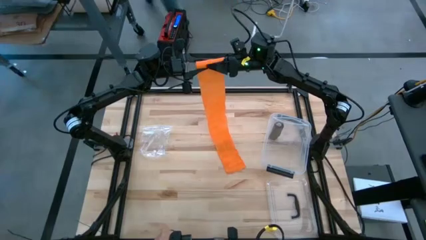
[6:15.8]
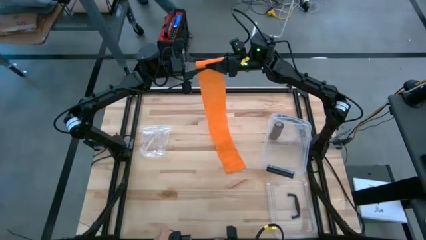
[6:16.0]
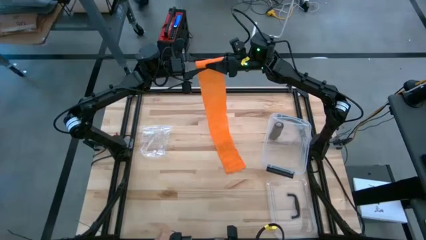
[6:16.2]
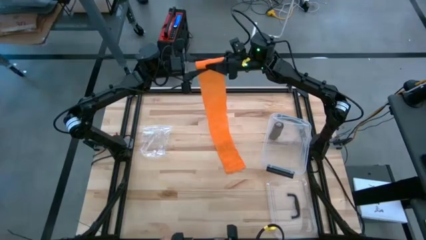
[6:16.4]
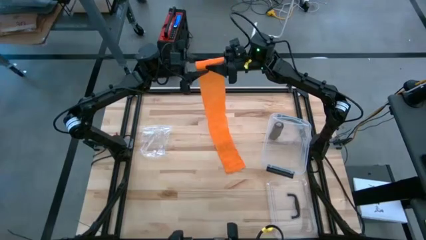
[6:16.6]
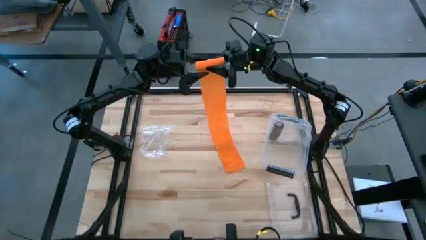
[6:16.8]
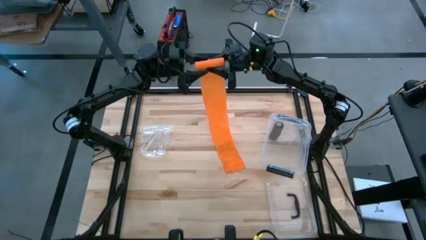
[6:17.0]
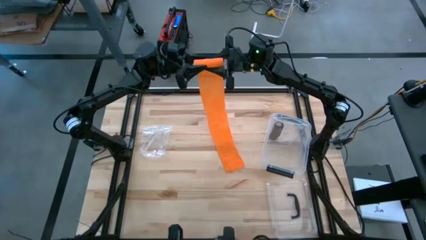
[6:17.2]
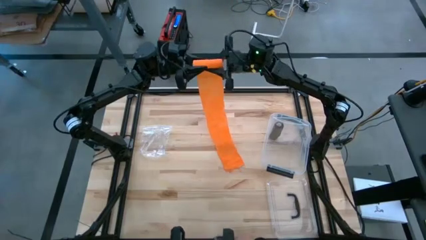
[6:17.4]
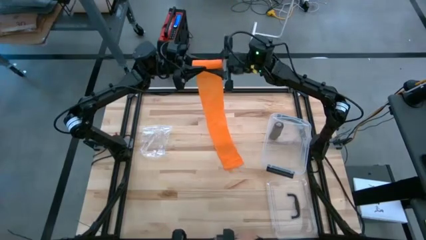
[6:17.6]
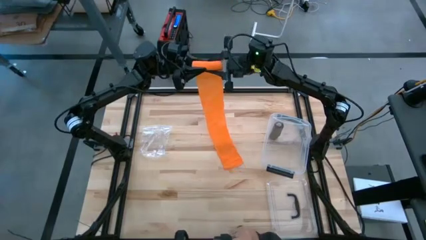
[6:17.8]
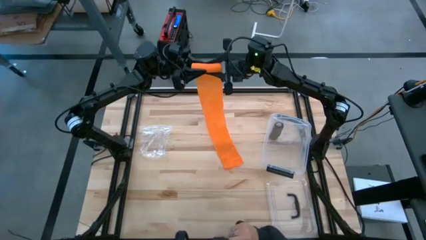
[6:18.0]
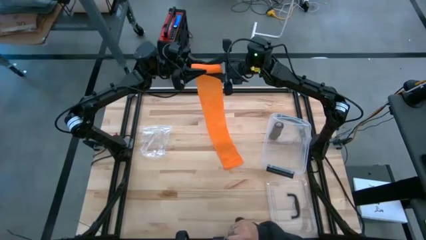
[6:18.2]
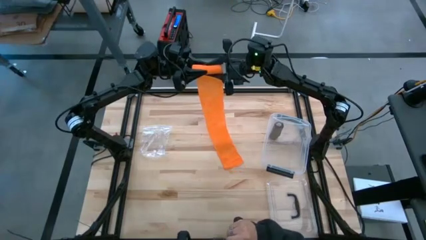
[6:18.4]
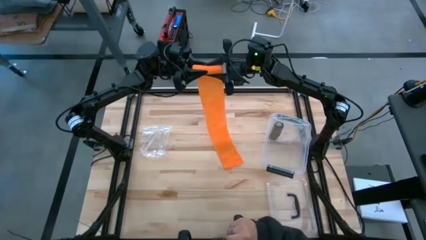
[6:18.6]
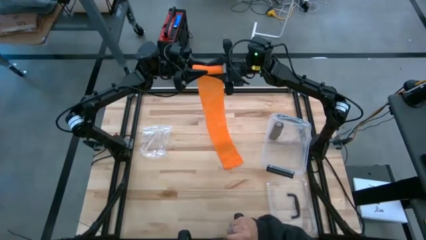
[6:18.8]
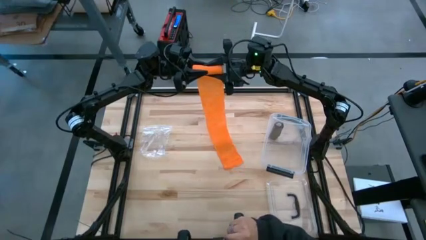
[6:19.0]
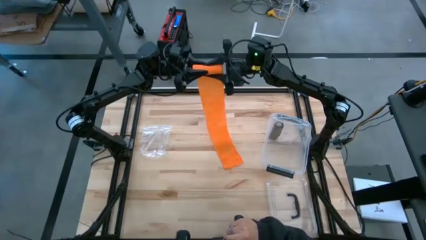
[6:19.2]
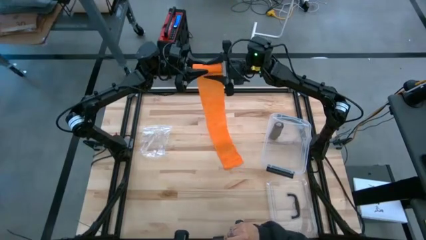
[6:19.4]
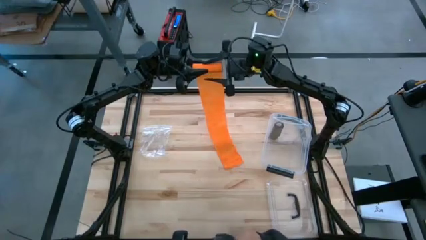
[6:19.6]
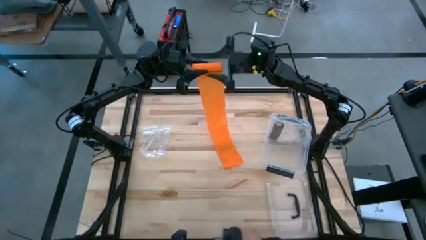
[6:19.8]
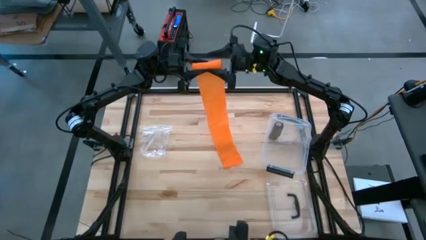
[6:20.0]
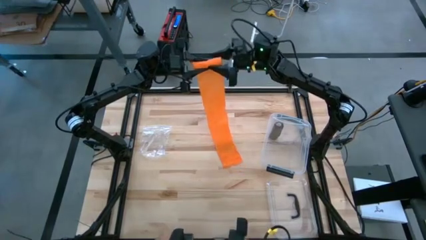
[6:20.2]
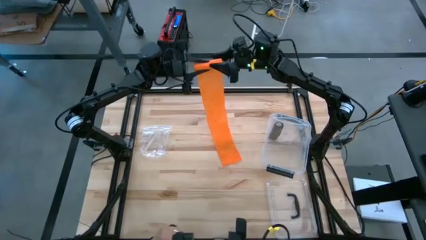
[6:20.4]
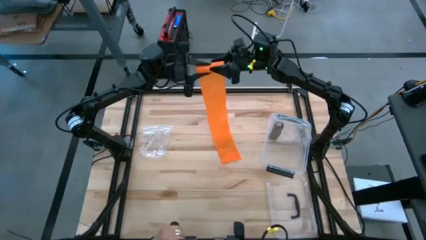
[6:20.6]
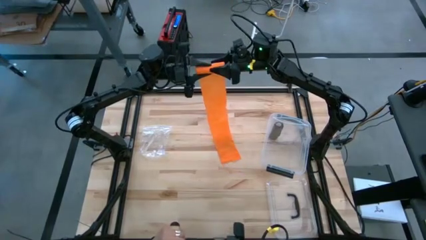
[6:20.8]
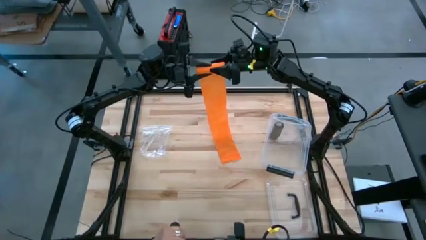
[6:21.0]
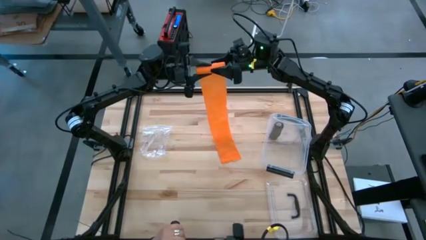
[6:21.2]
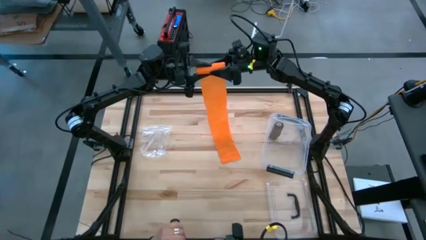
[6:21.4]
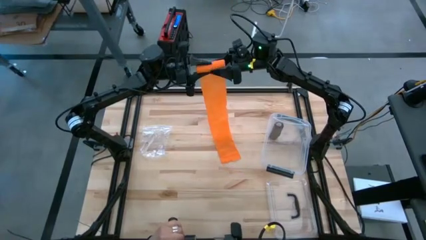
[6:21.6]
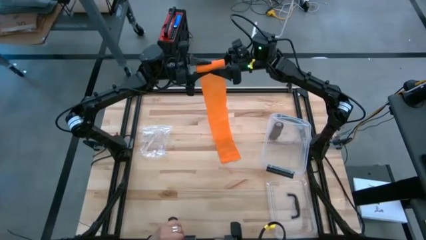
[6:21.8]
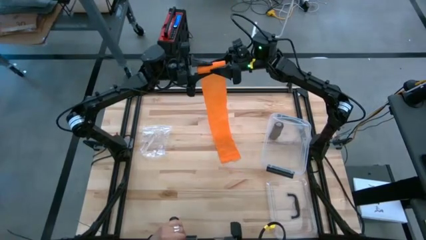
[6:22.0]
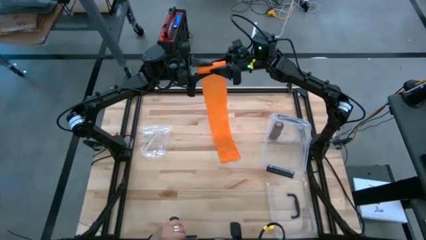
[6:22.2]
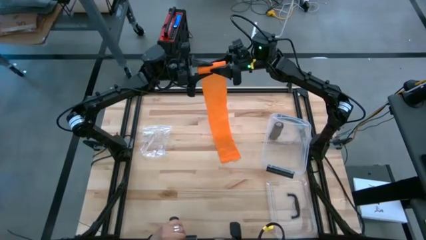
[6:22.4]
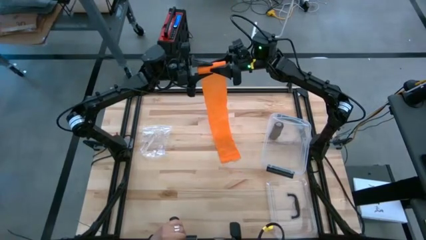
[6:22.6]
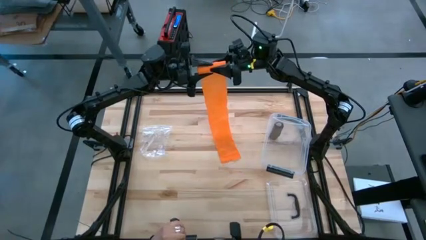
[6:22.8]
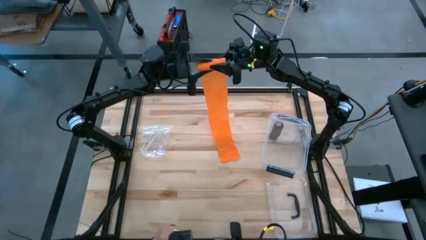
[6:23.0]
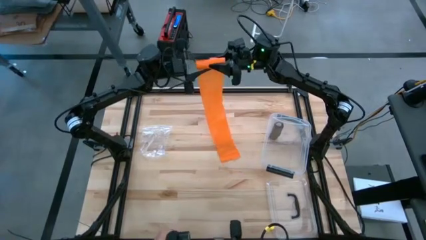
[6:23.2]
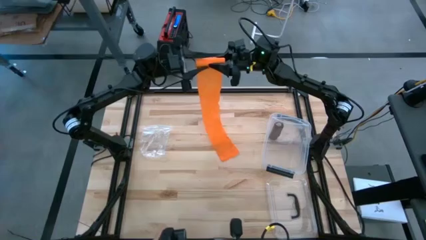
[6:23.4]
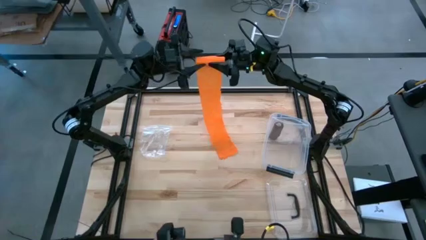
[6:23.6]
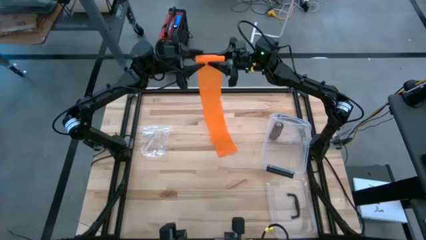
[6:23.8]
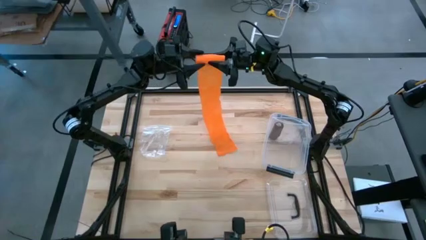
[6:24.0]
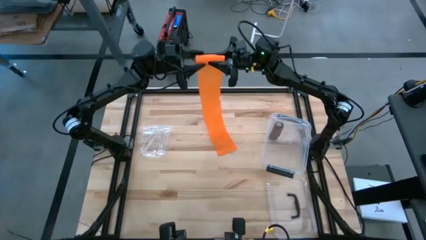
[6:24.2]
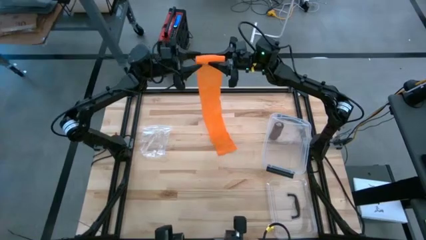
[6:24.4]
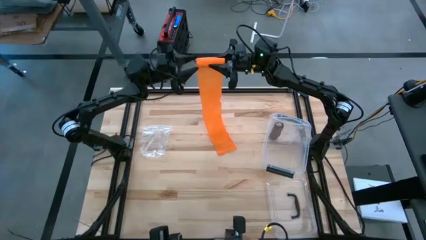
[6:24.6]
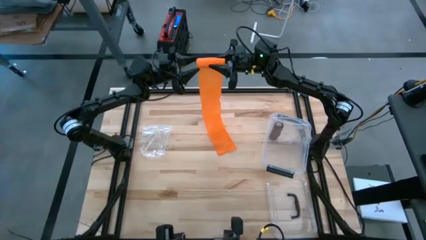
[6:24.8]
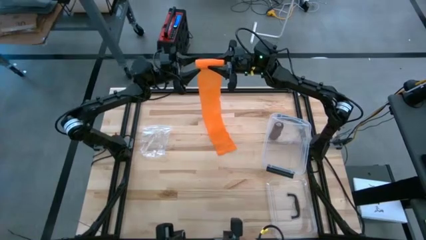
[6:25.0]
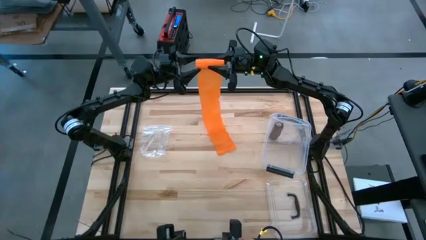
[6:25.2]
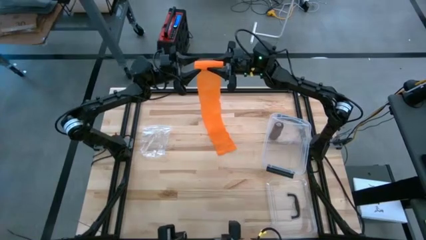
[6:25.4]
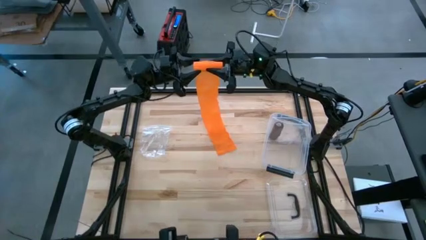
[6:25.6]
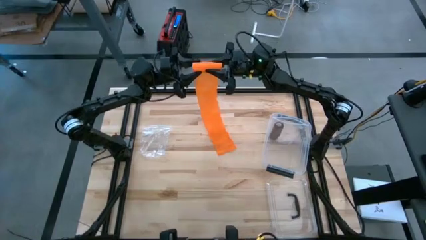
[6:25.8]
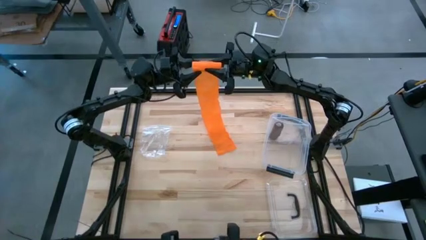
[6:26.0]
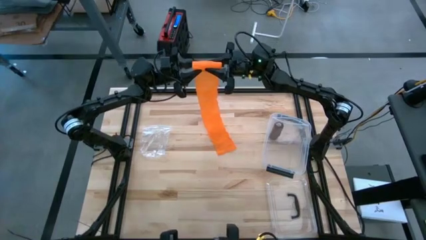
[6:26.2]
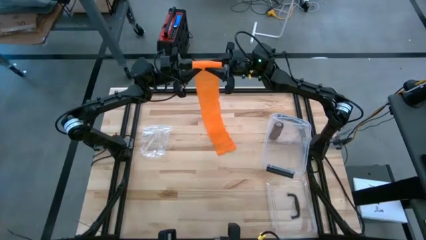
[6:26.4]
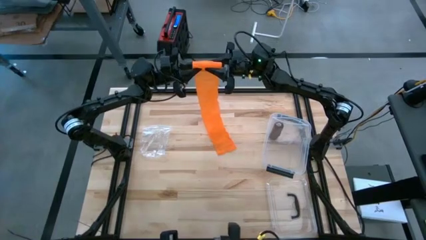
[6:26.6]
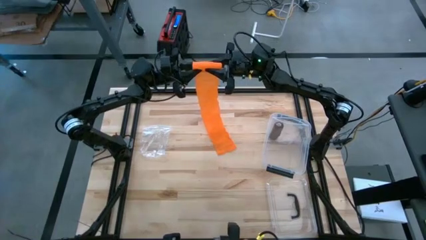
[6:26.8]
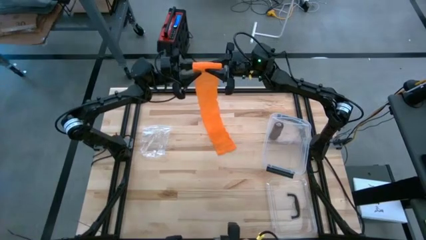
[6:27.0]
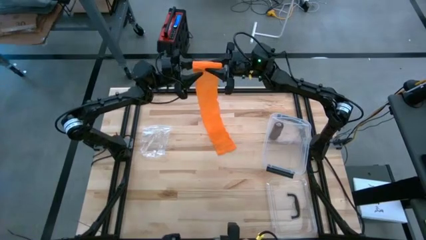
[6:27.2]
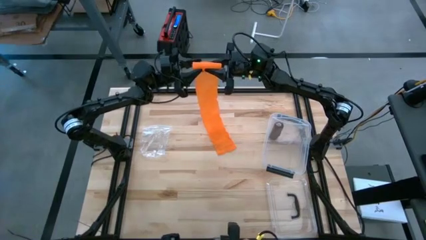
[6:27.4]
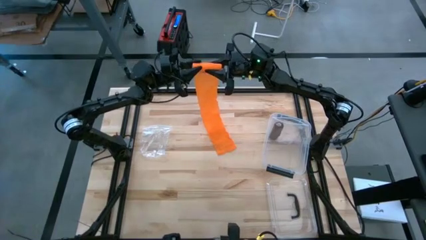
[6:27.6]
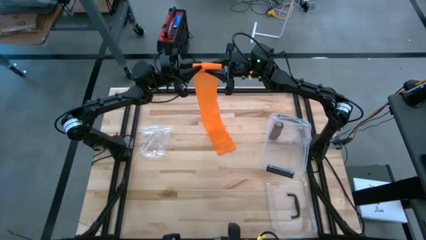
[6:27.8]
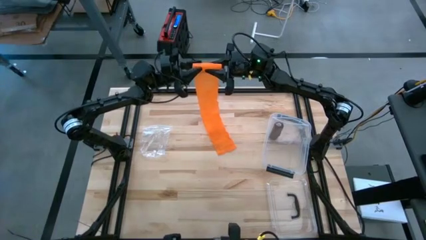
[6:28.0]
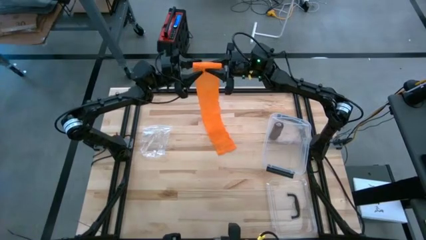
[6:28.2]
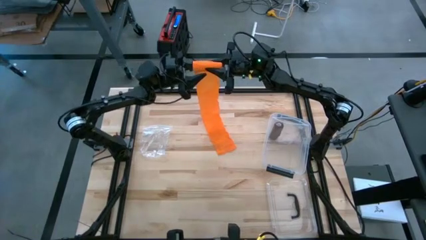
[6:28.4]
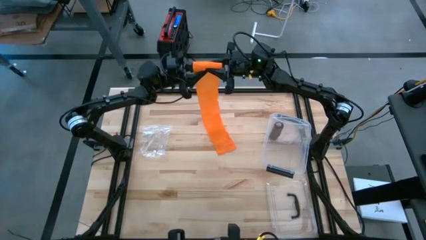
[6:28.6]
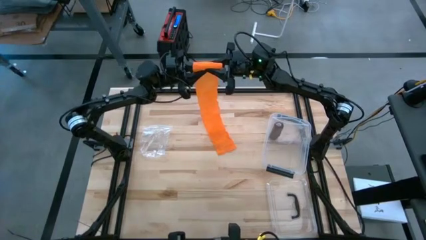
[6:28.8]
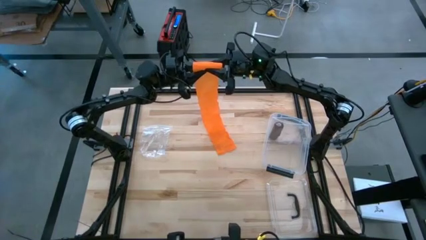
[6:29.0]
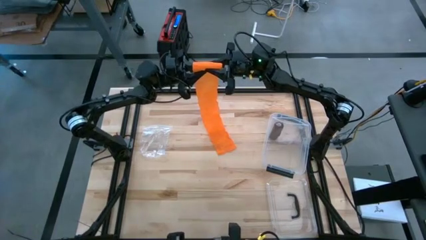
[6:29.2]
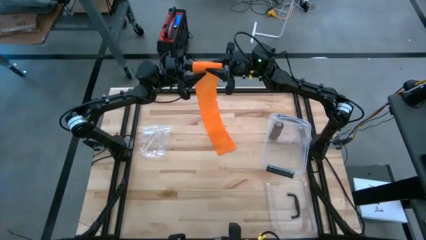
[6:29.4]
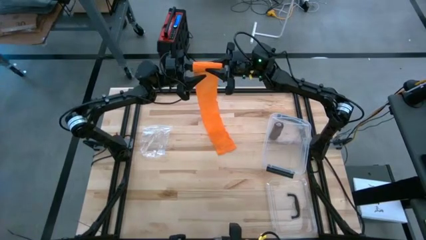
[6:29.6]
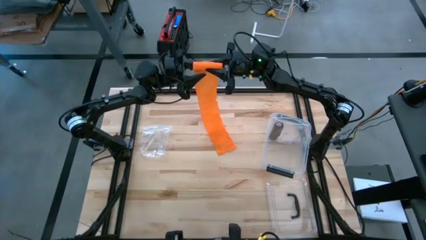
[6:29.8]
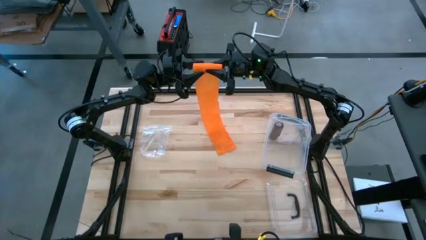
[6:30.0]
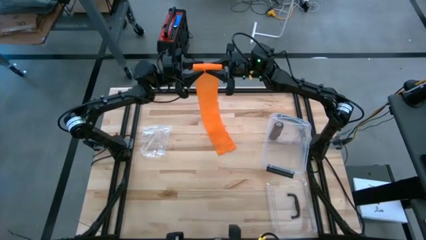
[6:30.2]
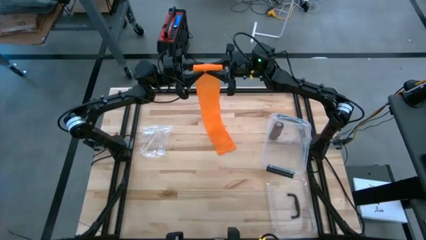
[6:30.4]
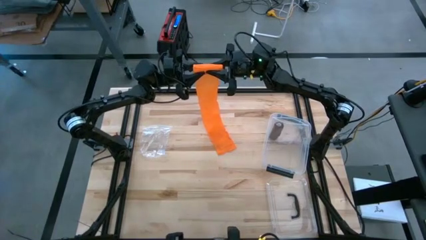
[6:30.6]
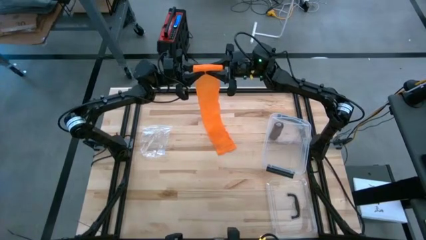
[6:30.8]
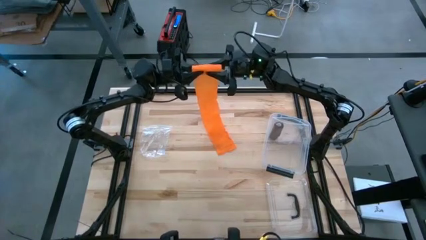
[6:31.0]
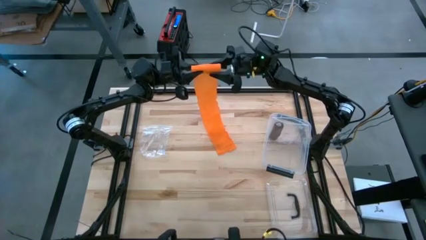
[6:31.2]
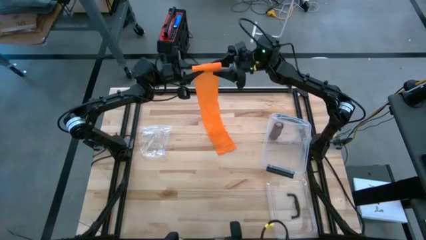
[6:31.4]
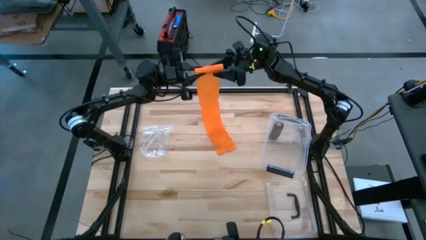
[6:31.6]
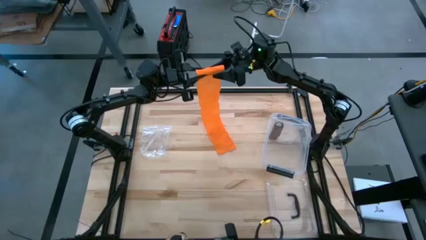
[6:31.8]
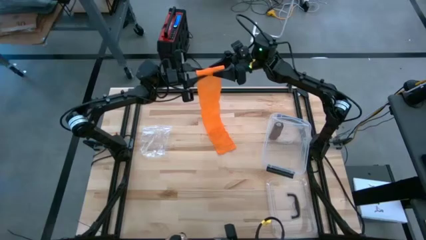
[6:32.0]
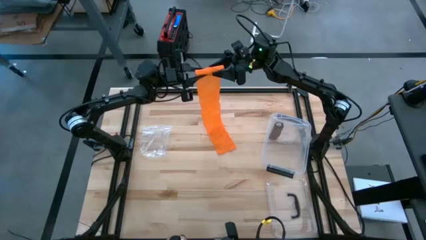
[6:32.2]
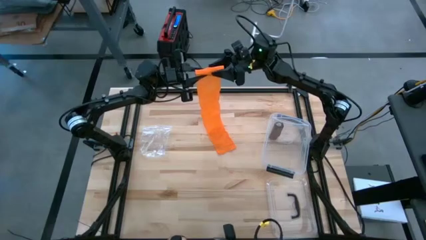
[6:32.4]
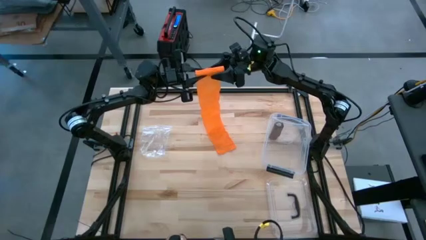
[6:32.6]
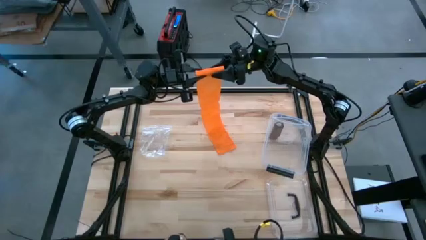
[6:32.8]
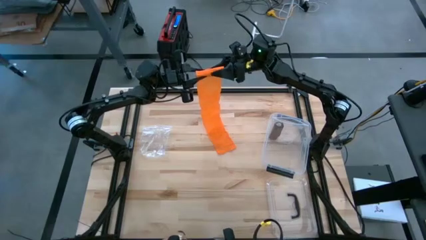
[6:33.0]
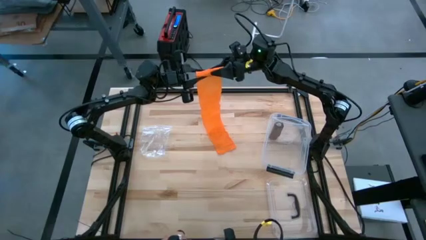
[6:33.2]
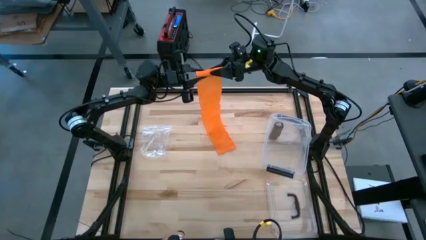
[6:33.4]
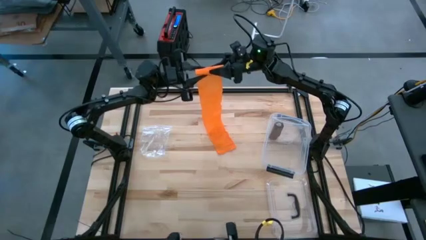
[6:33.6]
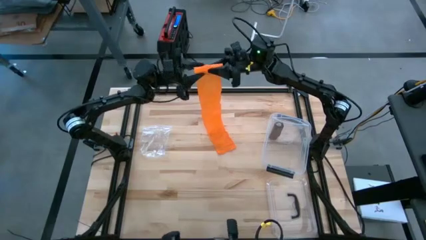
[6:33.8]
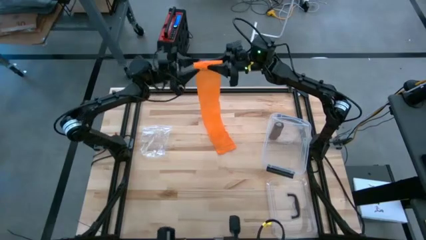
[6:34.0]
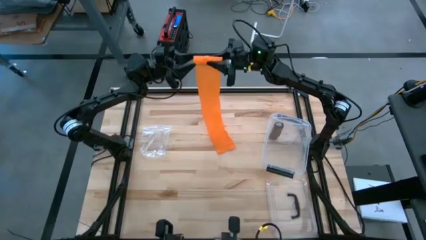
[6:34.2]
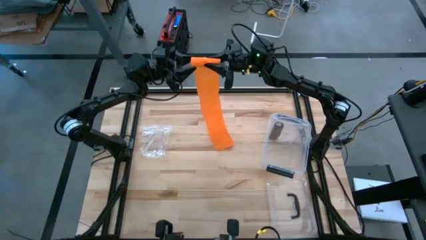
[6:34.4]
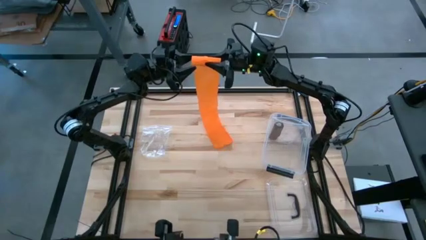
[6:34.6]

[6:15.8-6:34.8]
Task: Roll bandage
Roll the orange bandage
